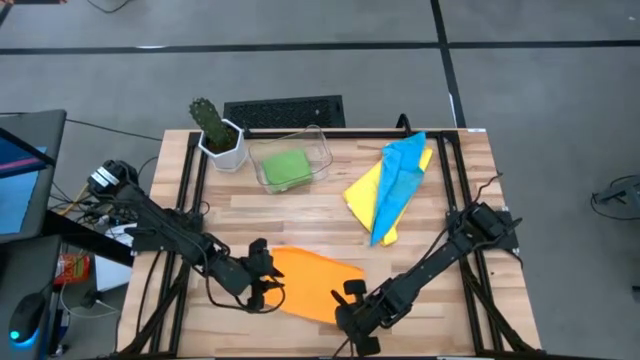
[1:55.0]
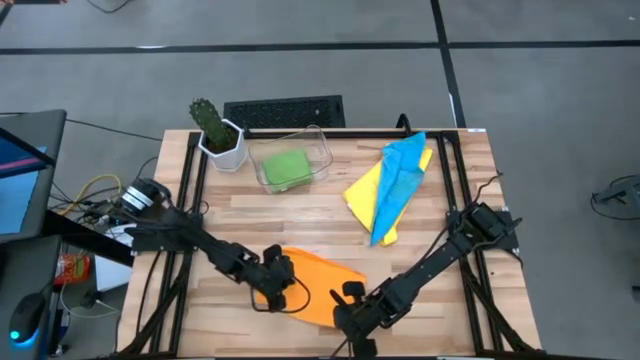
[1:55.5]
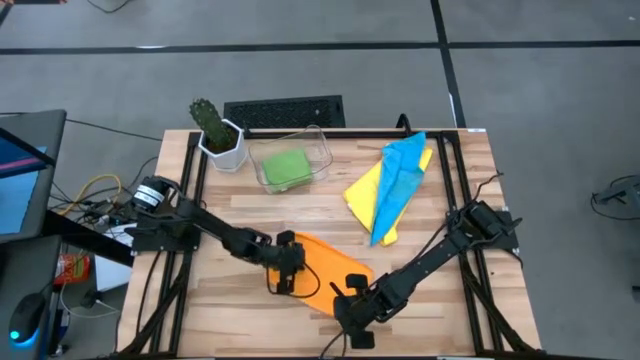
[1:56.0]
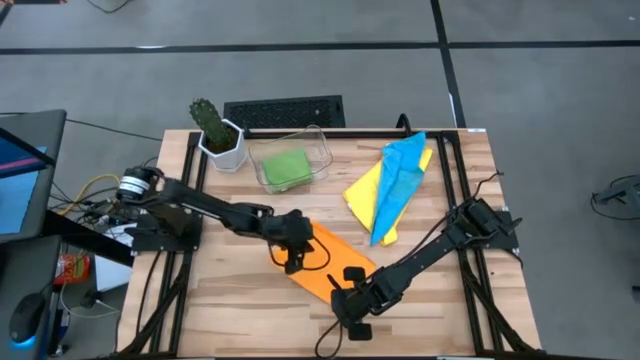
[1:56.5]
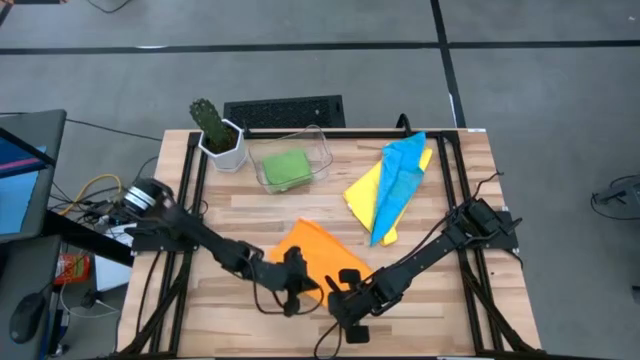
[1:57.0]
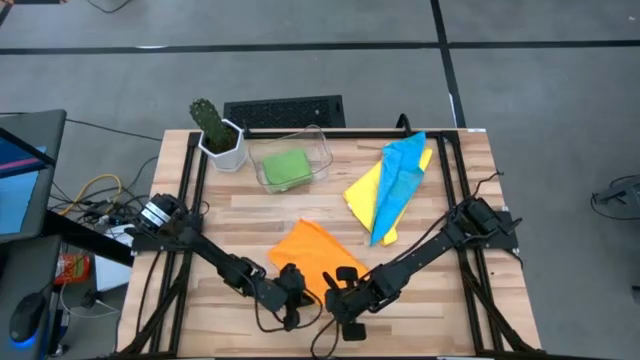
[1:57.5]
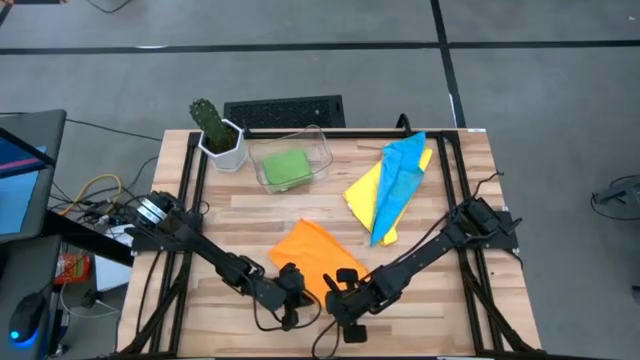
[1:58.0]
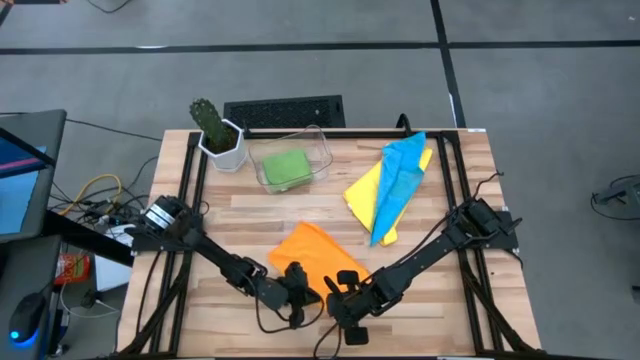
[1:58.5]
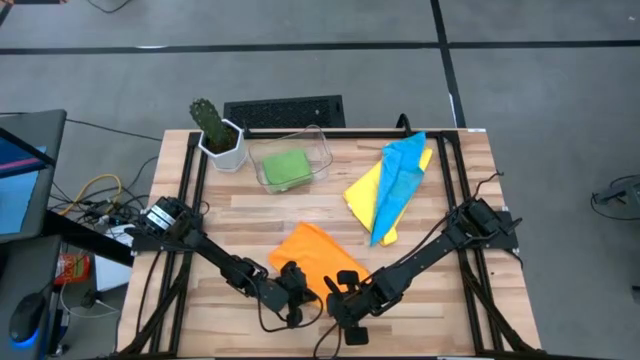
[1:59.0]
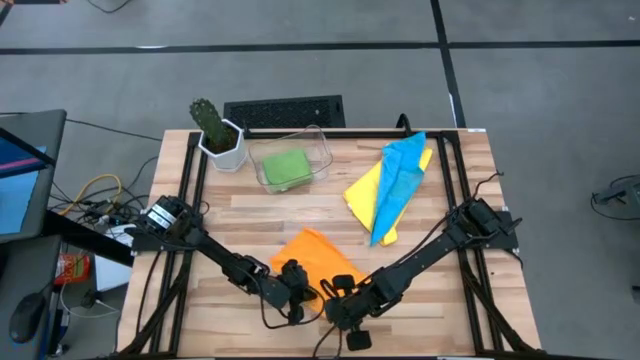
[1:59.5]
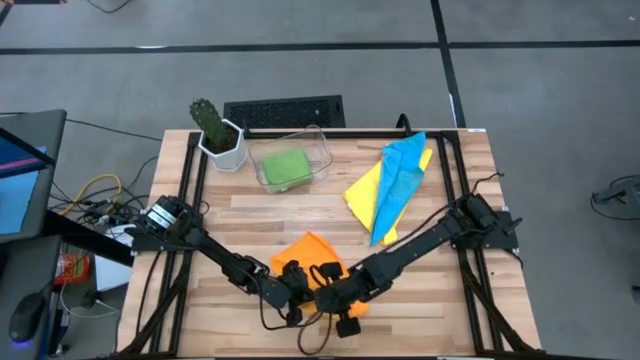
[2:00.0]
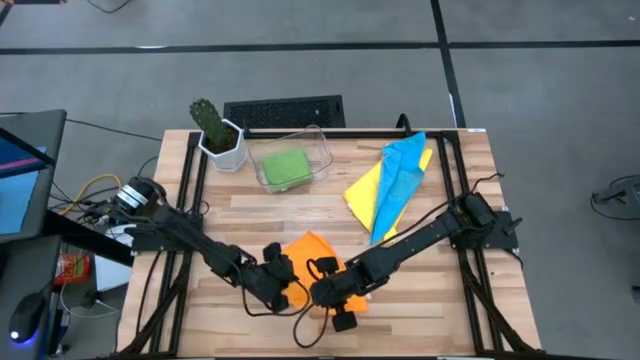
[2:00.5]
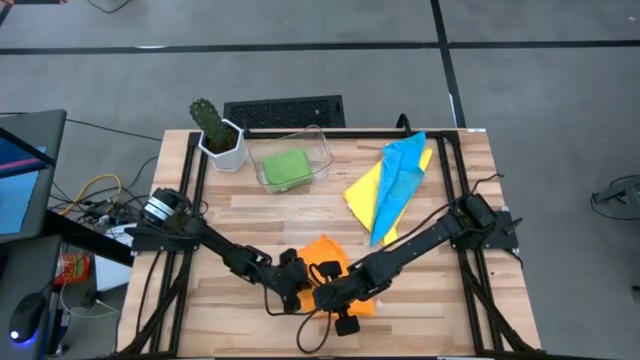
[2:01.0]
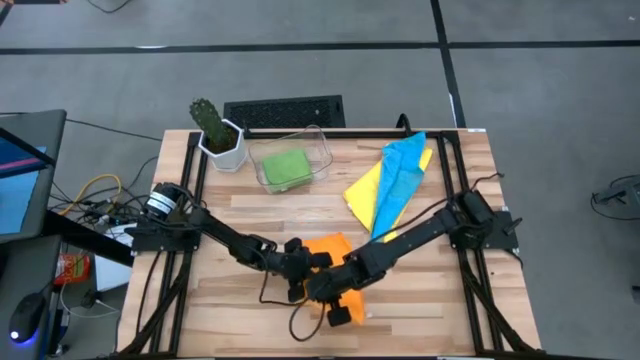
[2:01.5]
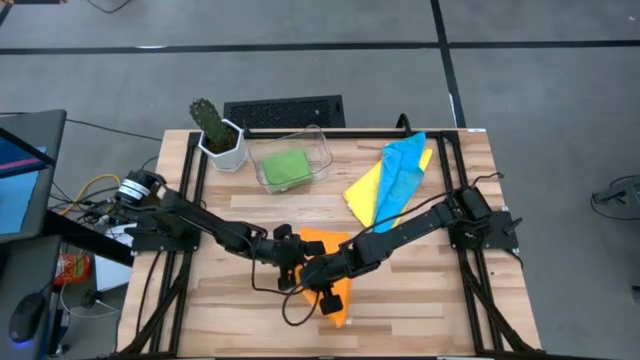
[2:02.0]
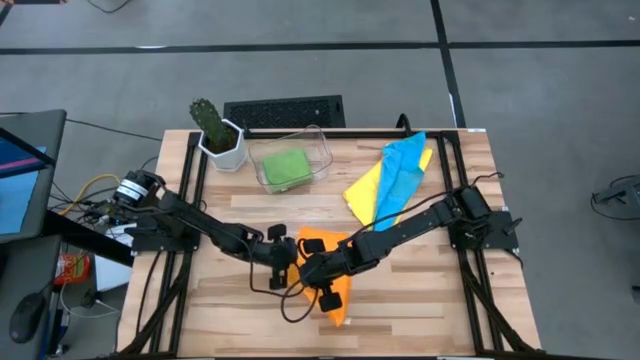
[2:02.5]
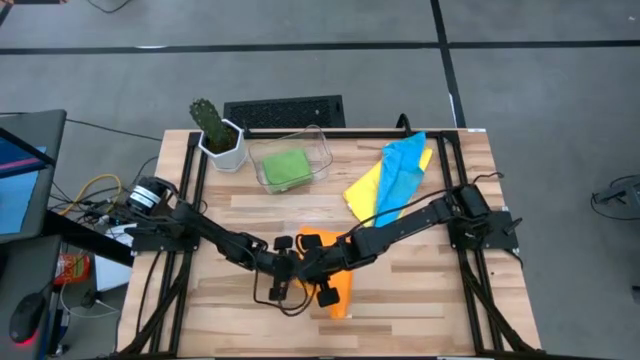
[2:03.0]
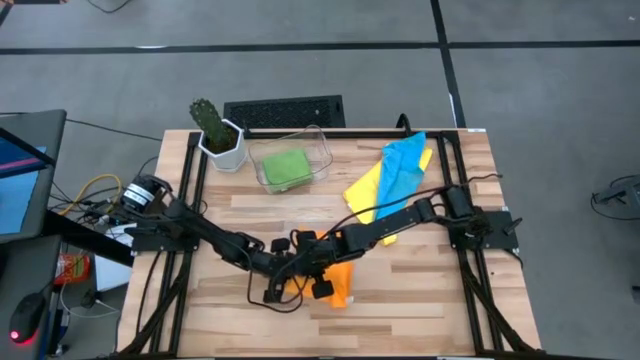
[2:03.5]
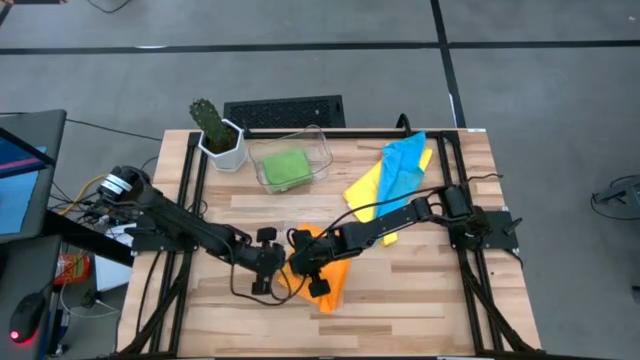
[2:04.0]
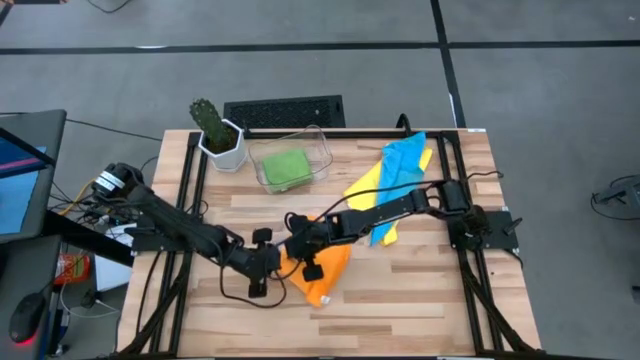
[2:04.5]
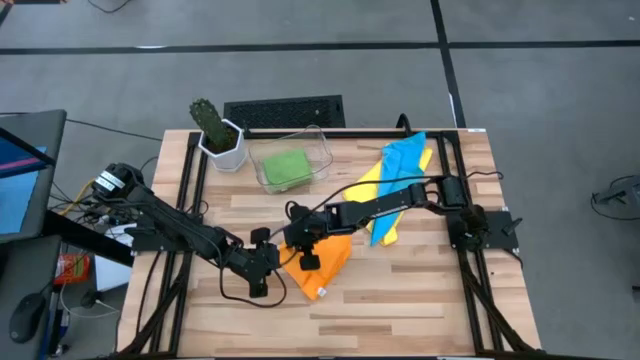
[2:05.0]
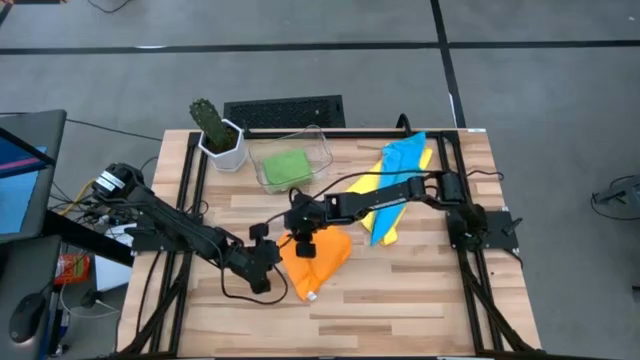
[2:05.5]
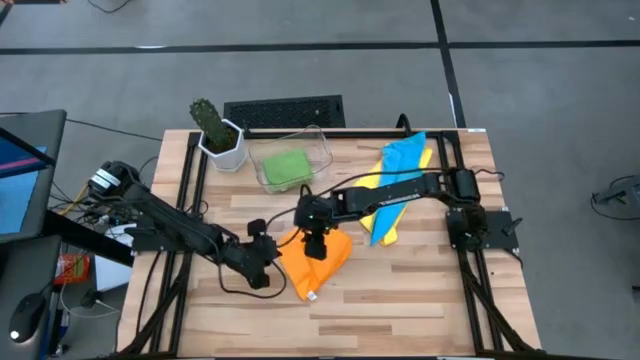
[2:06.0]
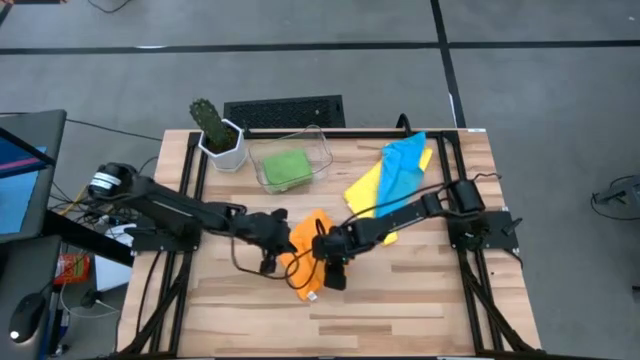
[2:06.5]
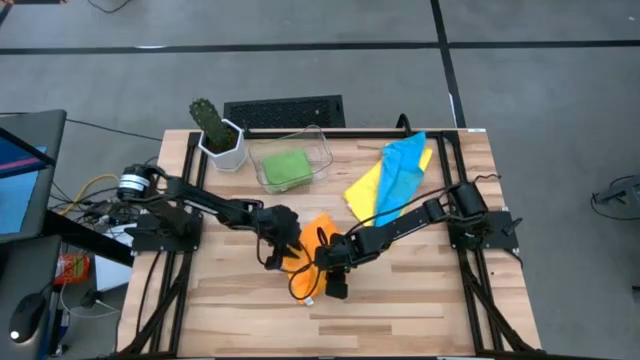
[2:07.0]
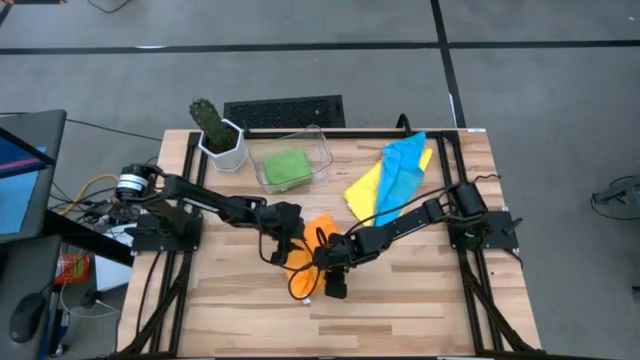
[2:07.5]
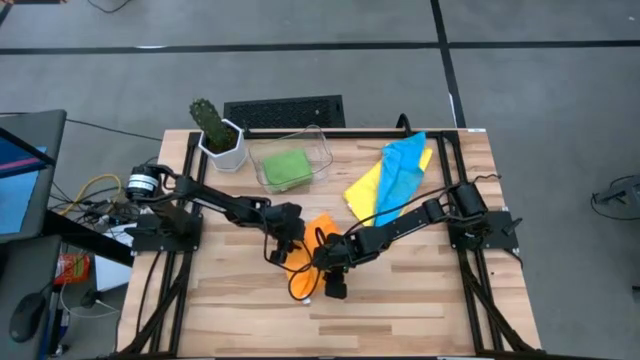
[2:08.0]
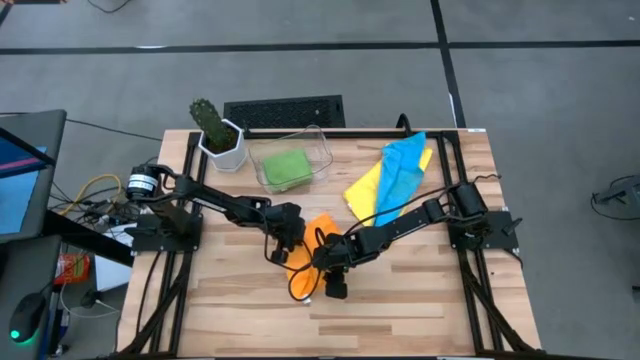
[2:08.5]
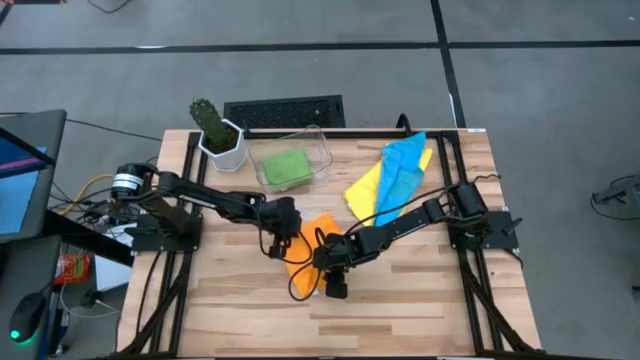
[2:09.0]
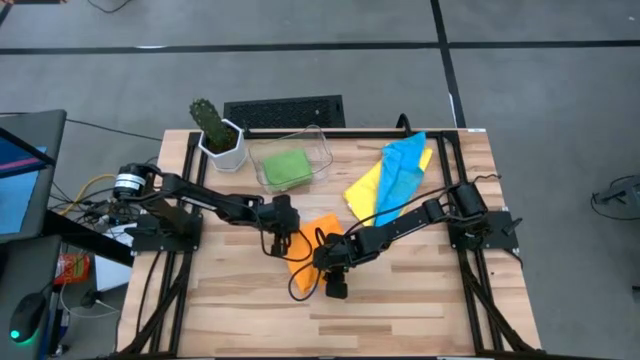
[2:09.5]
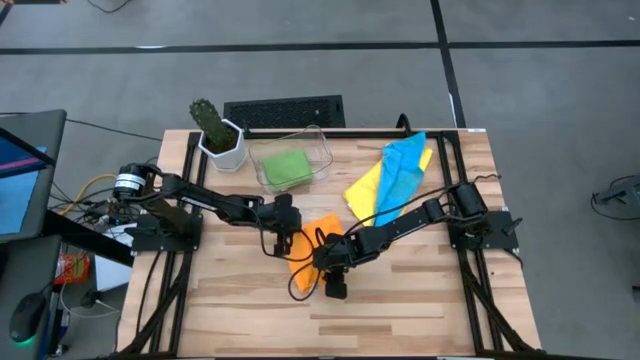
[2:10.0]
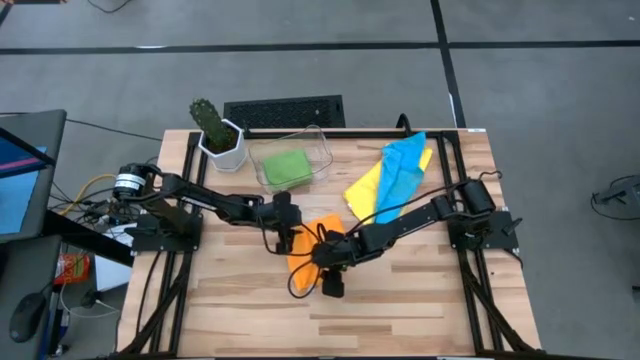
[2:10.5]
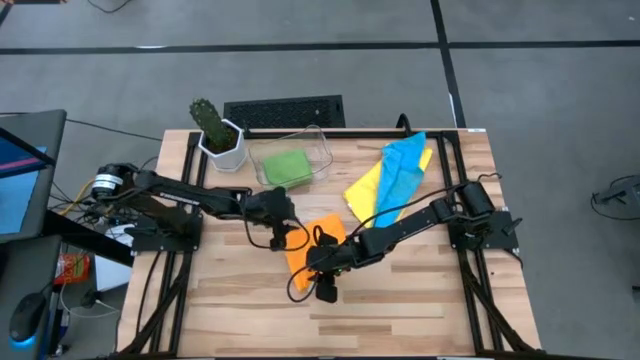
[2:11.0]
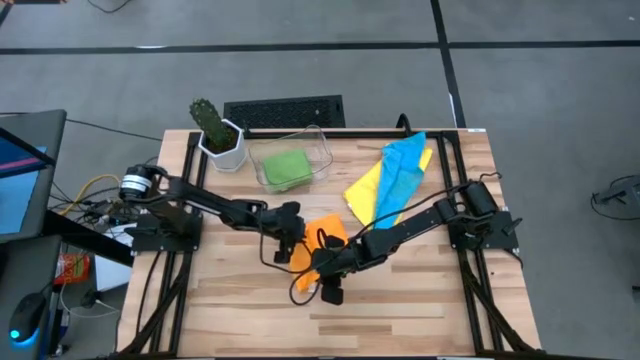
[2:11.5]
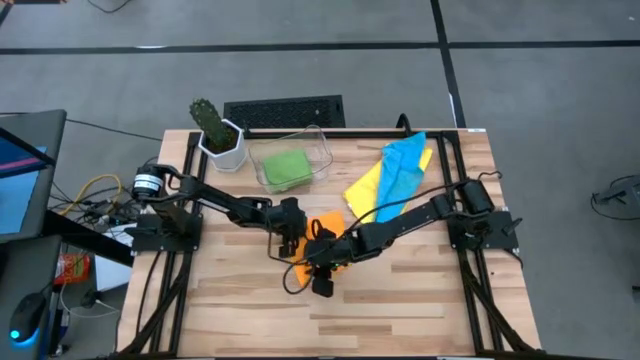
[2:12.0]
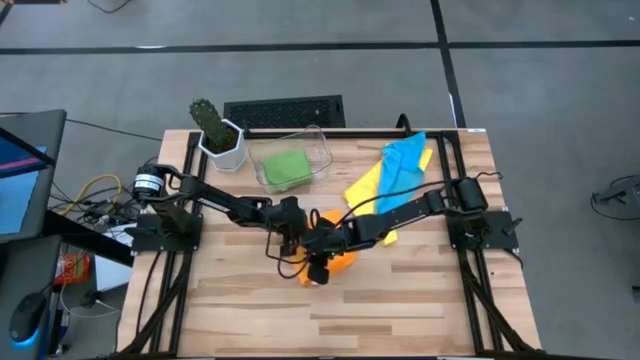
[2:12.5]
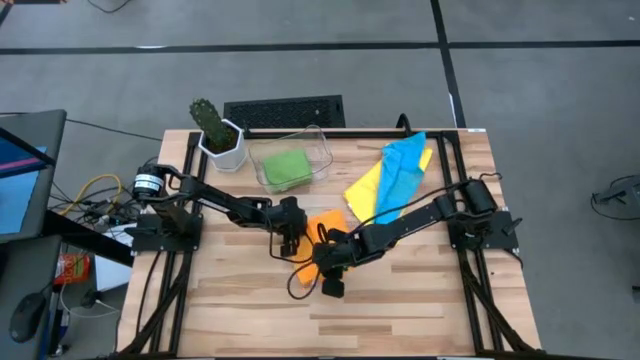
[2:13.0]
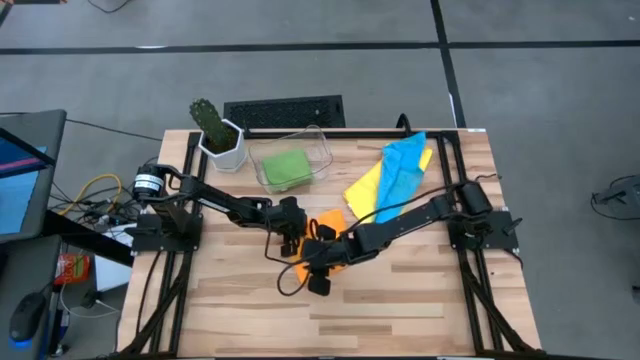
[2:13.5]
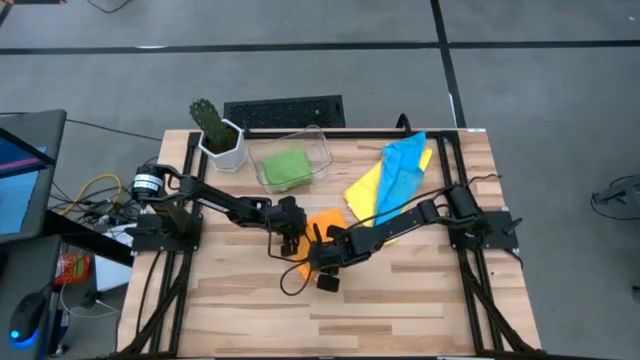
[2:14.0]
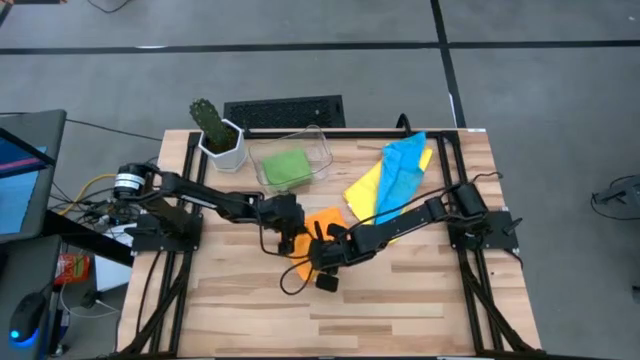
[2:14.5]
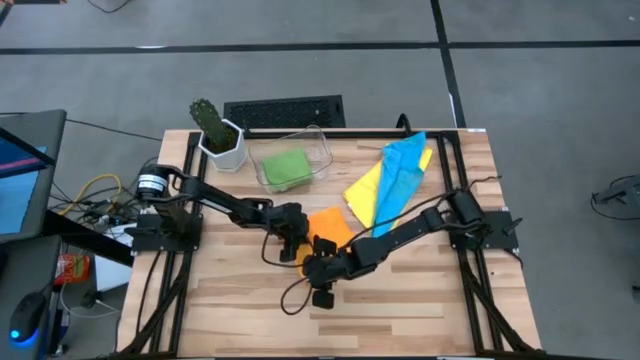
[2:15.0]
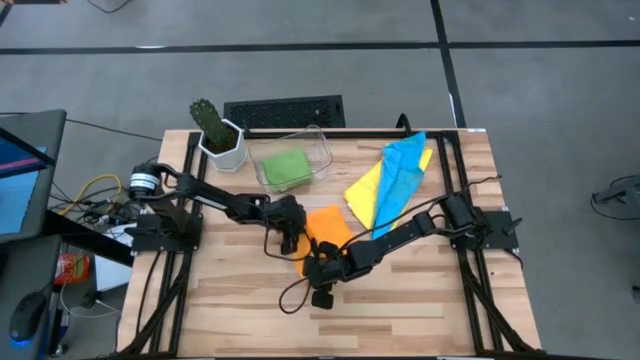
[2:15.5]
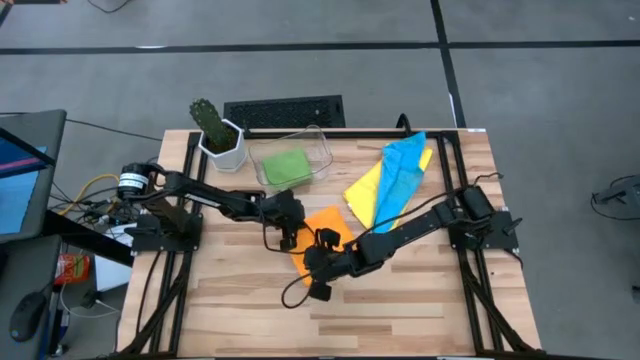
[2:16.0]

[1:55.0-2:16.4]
Task: Fold microfiber towels
Fold the orange microfiber cloth
